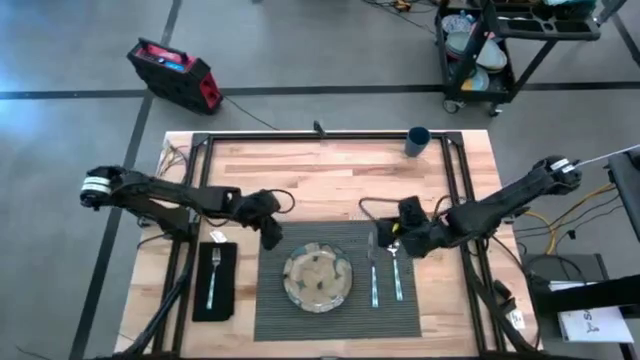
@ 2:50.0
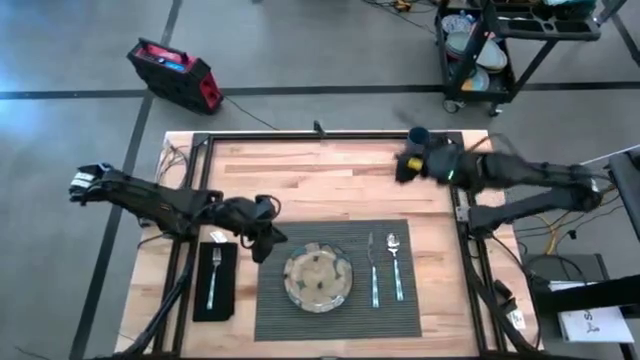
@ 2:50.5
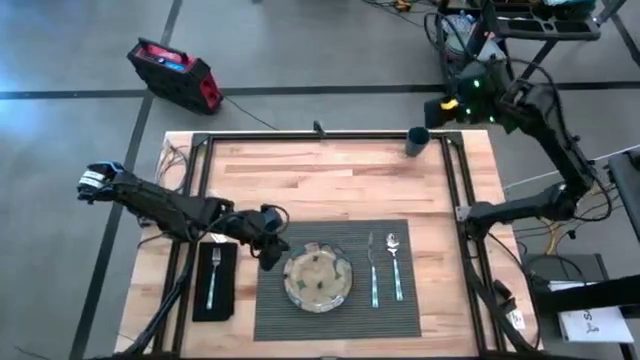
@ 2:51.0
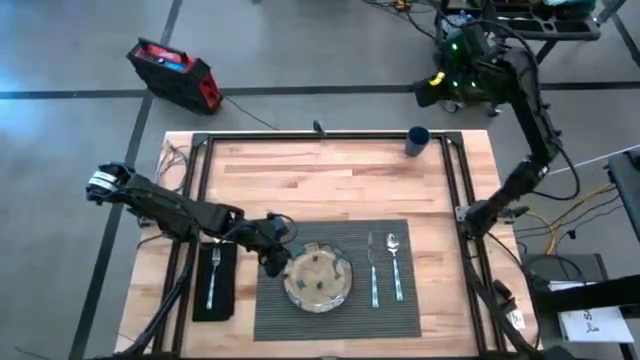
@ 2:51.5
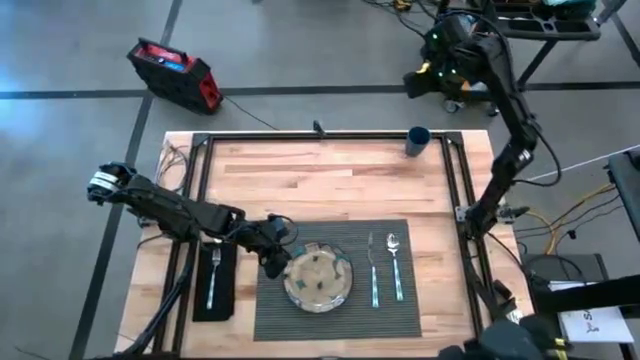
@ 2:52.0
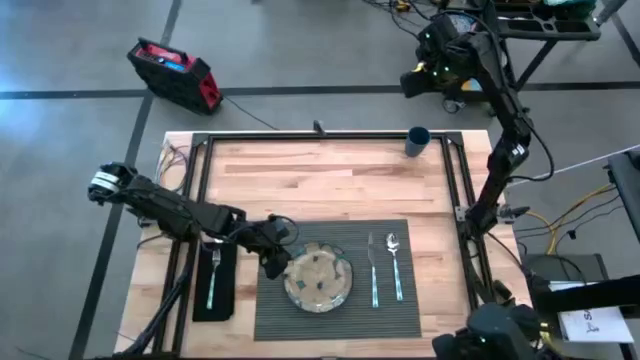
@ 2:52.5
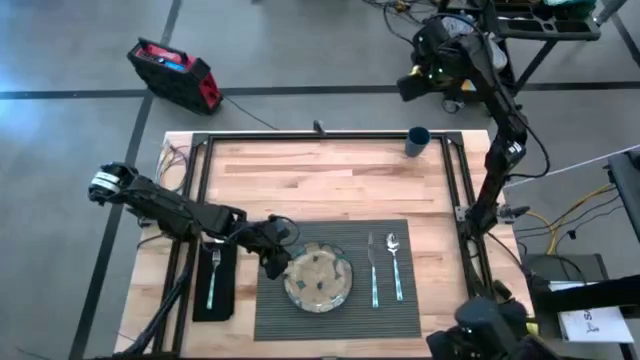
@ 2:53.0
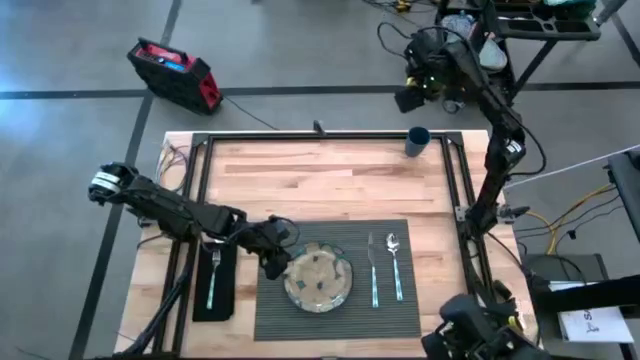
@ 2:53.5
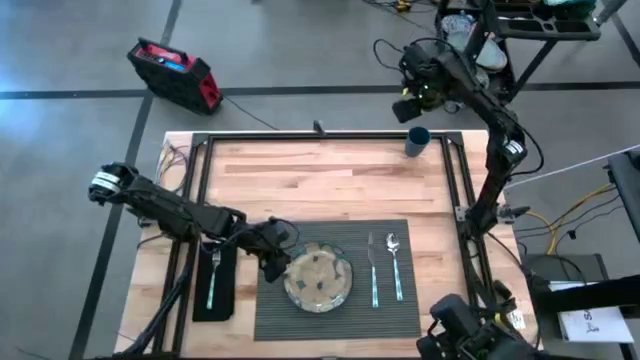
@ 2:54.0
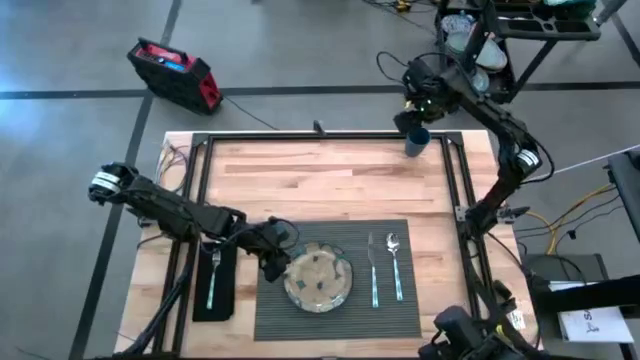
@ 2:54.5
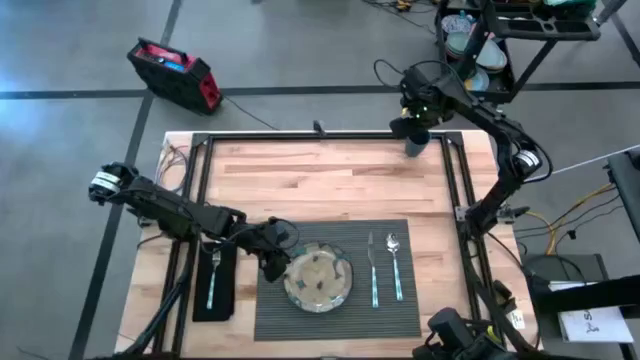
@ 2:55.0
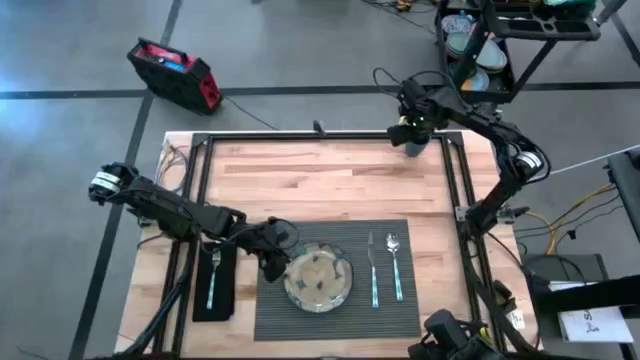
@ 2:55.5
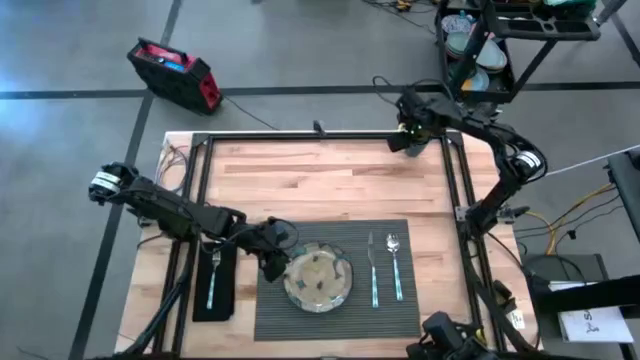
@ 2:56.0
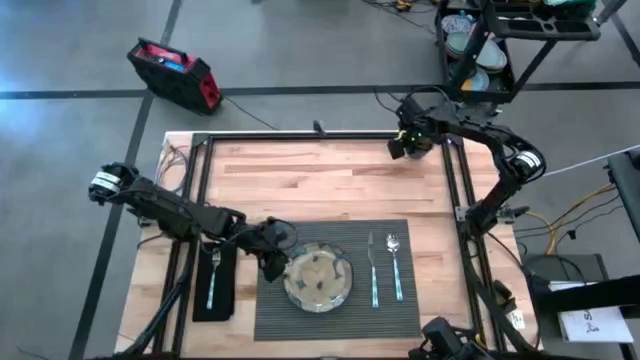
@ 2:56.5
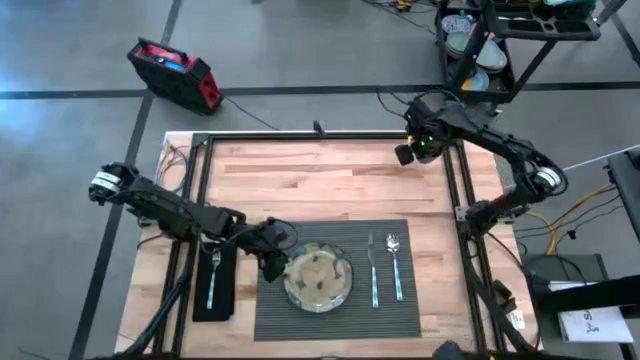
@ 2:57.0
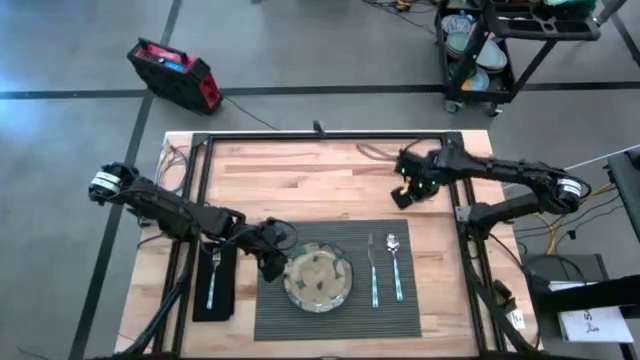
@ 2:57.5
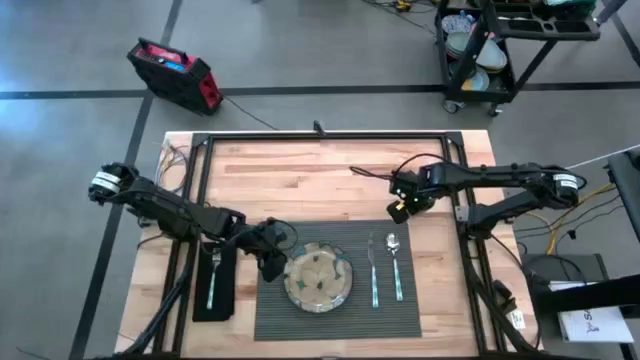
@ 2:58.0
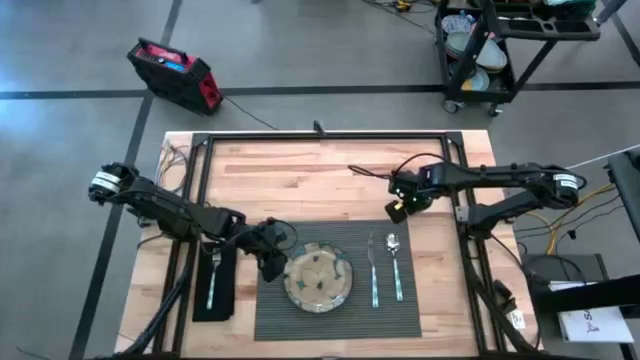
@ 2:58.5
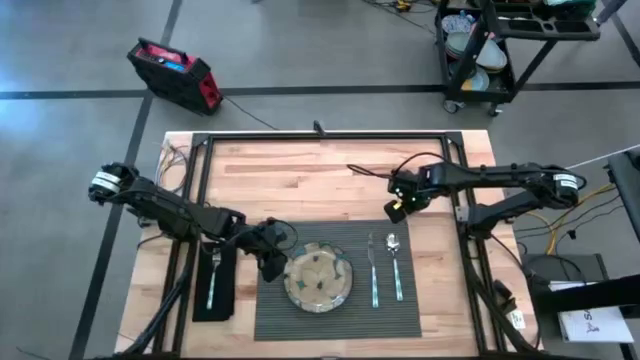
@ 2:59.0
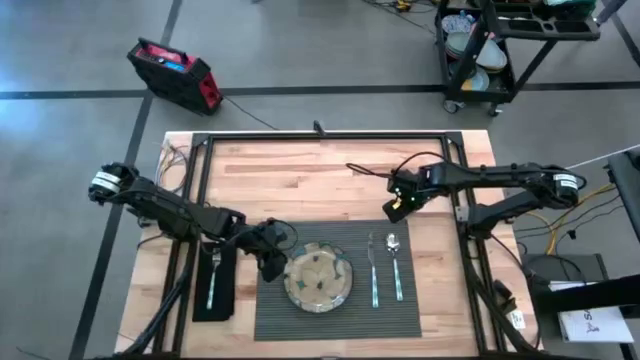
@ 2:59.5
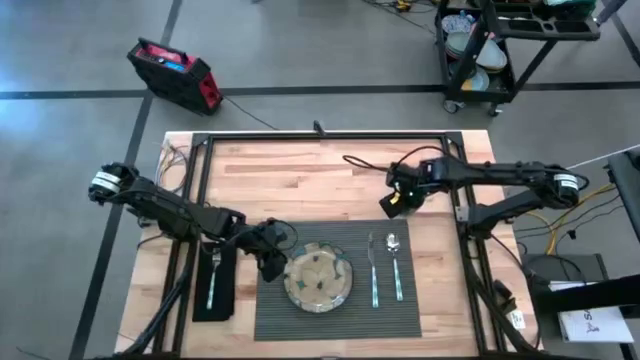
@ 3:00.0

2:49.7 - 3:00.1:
Task: Set table place
Move the blue cup to the middle right of the table

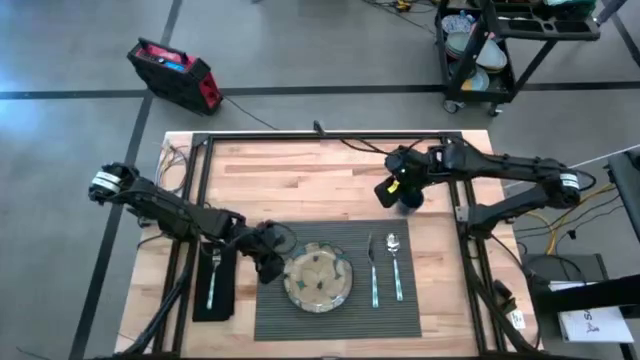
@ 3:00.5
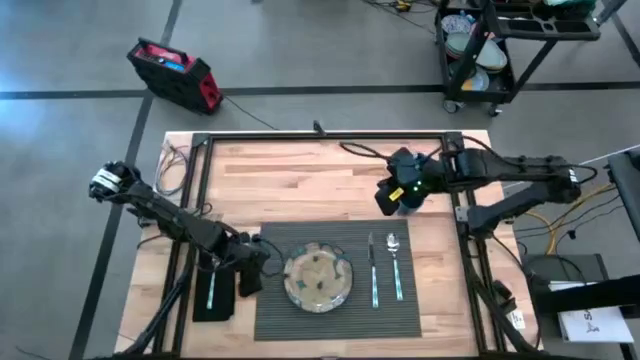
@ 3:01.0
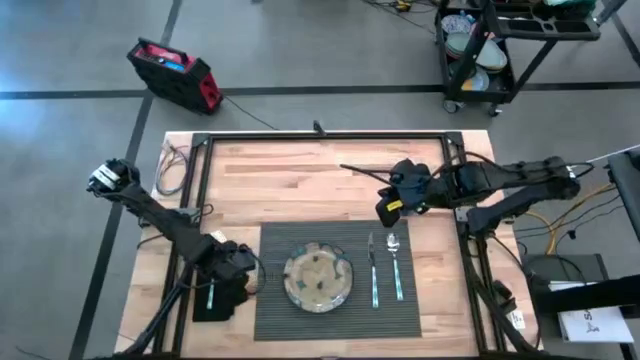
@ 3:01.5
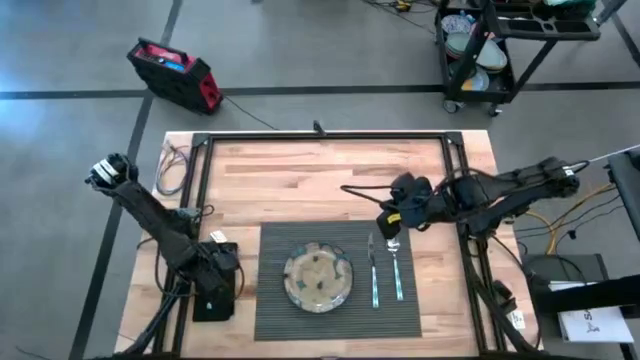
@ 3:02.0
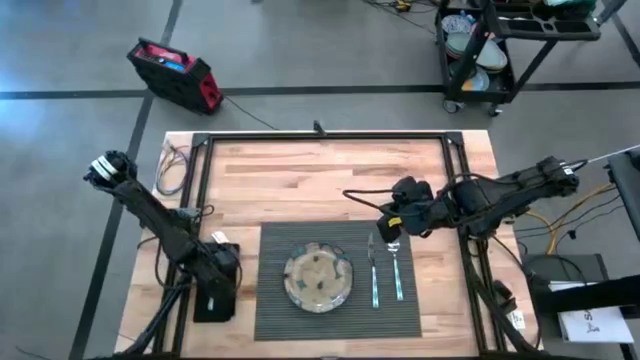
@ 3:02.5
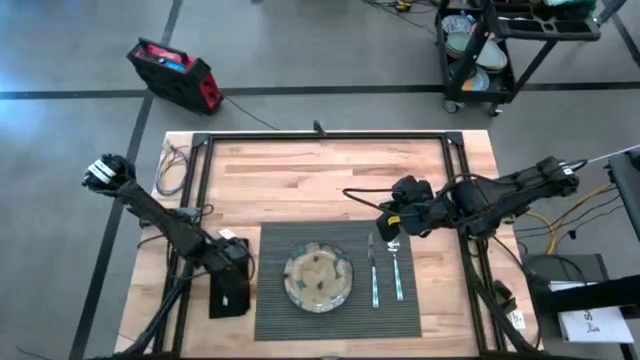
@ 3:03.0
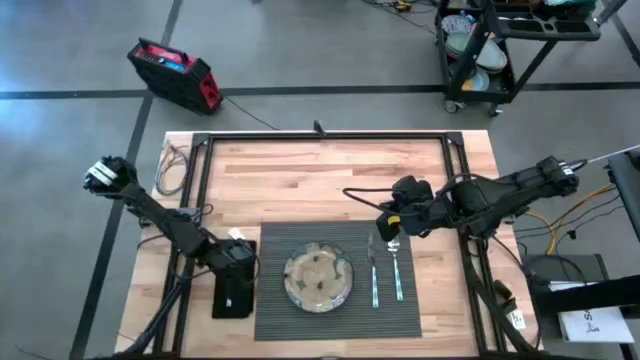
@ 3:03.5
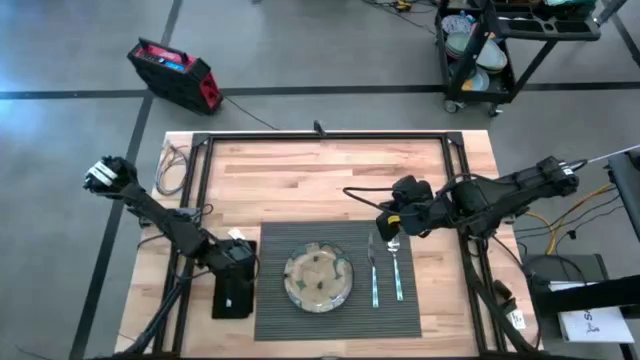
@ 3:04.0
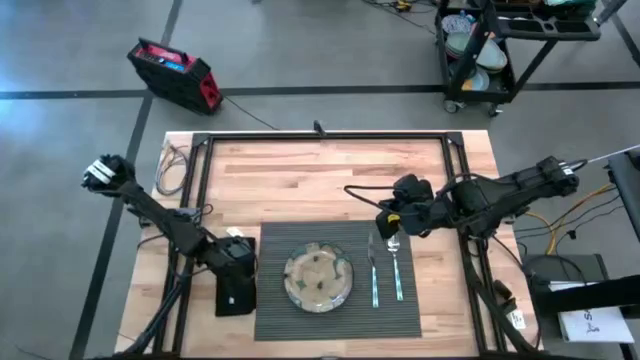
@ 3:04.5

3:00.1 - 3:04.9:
Adjust the black napkin

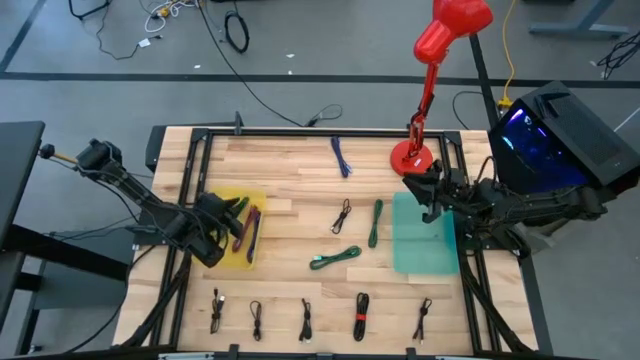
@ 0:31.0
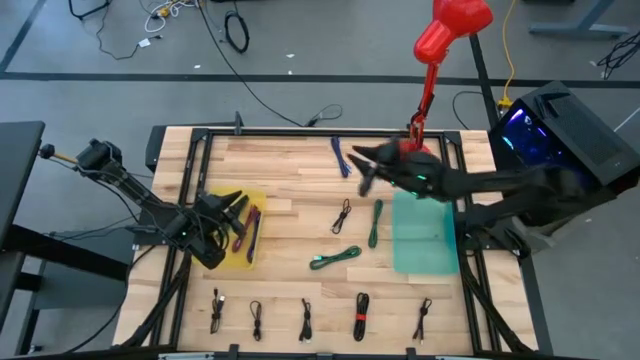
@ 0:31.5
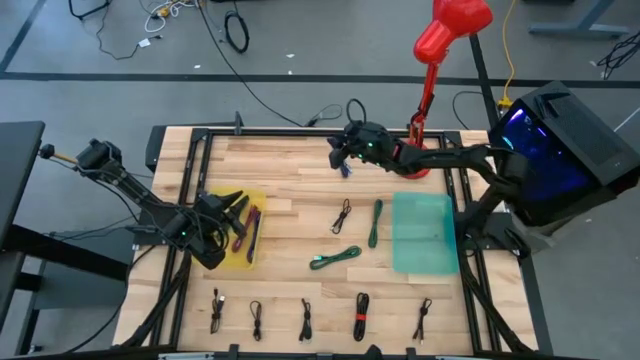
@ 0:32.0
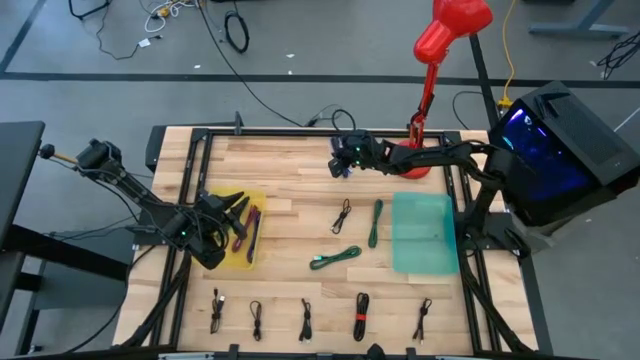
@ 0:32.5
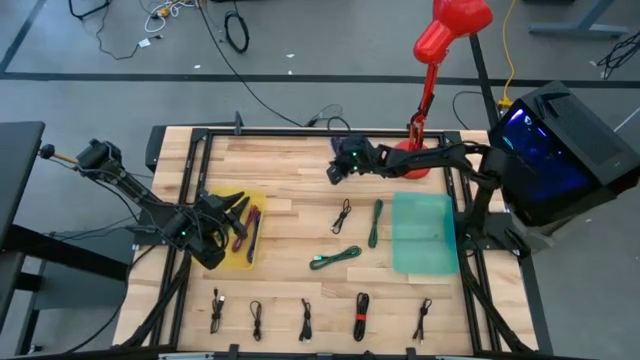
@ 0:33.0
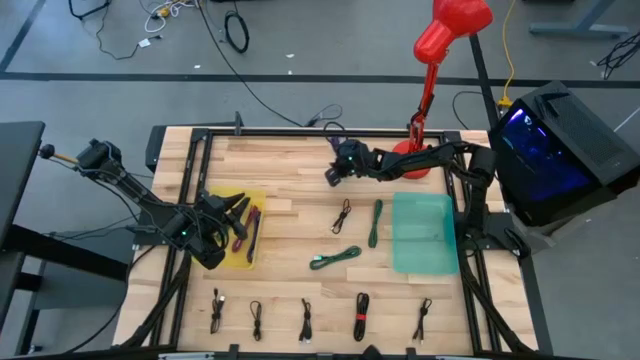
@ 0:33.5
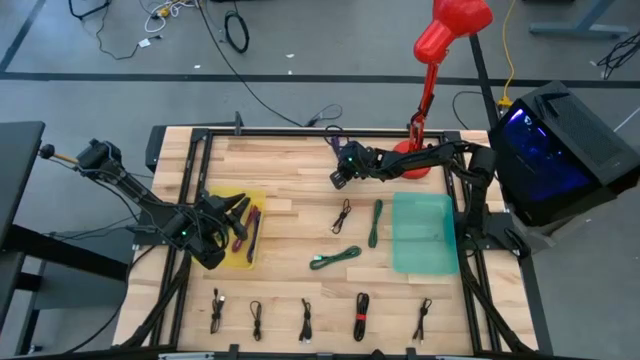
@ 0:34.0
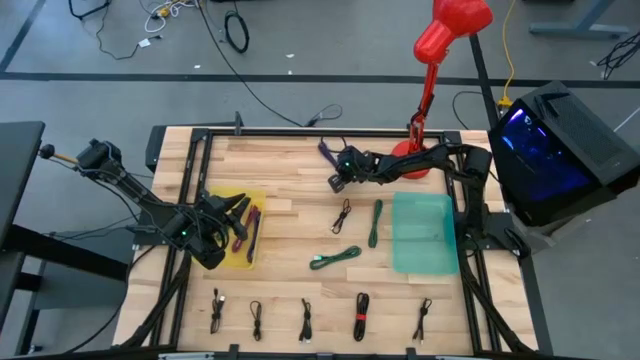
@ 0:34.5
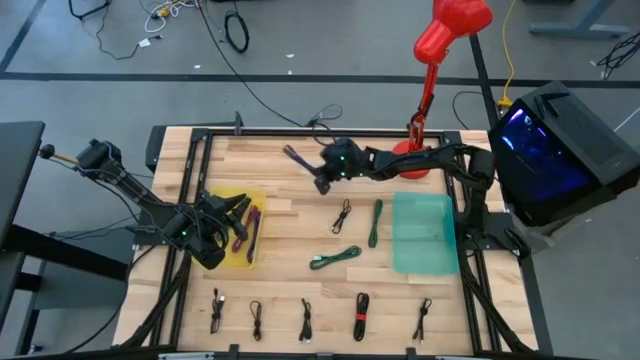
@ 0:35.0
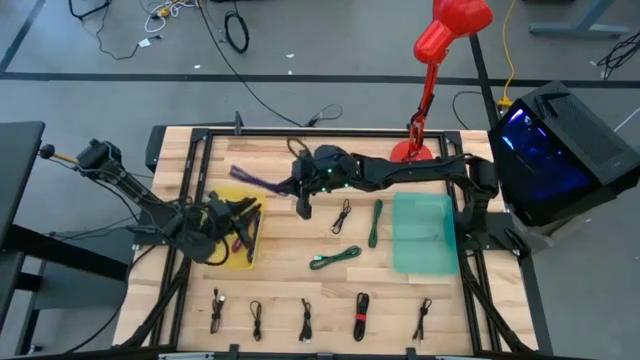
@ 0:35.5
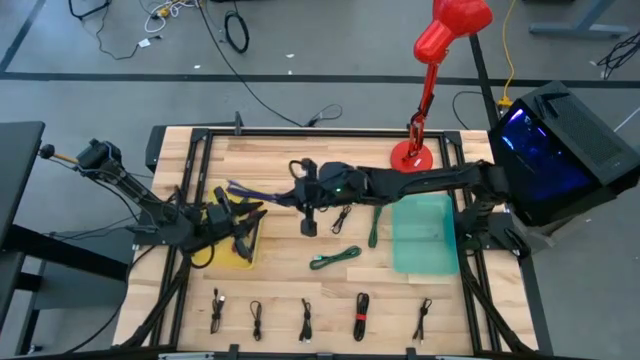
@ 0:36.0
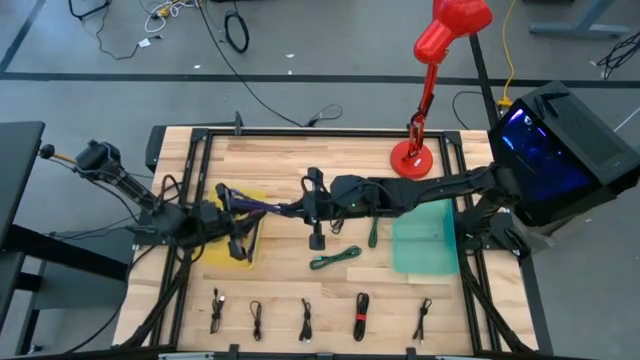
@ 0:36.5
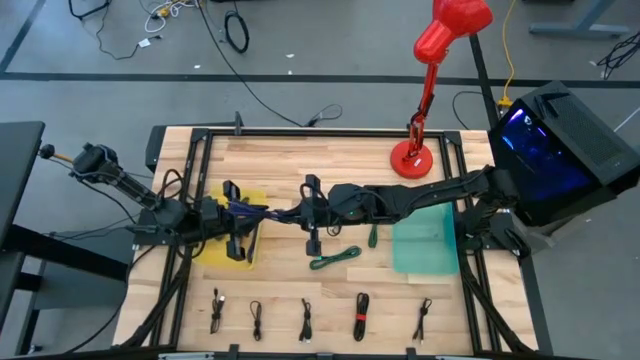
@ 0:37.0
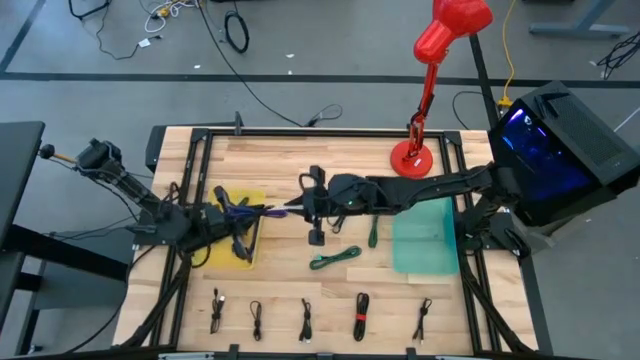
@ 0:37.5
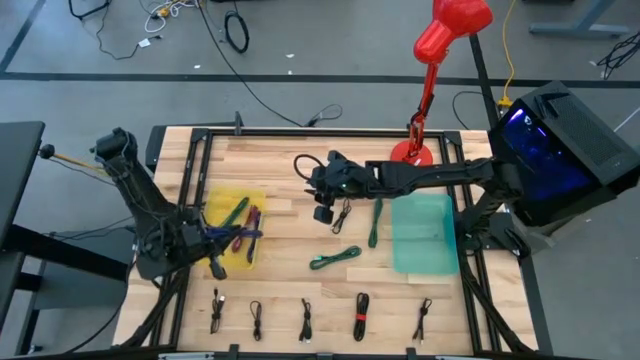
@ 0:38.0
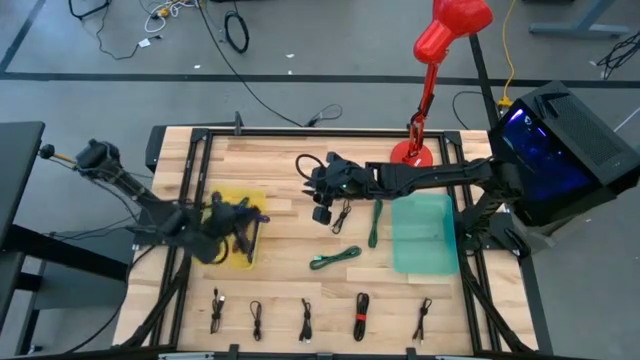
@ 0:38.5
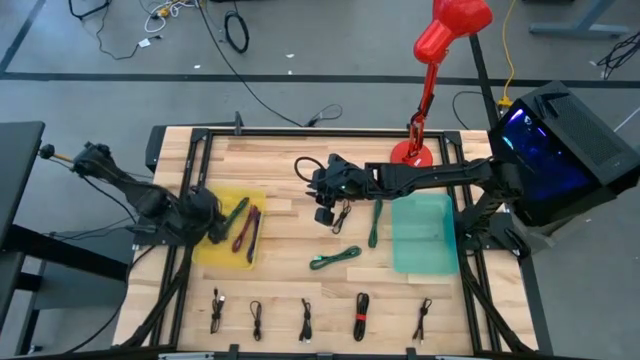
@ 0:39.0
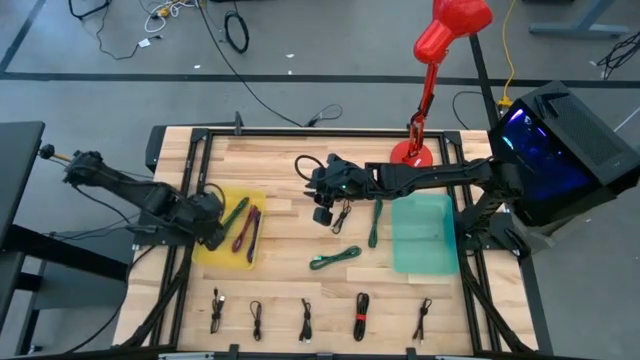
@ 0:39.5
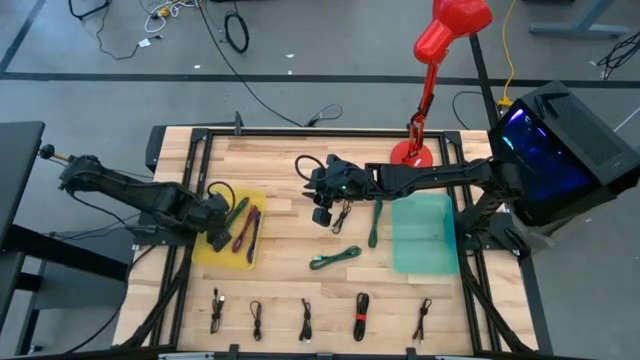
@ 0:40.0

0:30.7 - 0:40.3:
Task: Pick & Place USB Port
Put the black and blue charger cable into the yellow bin
